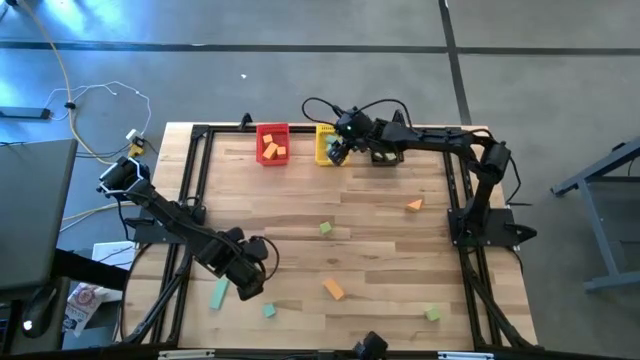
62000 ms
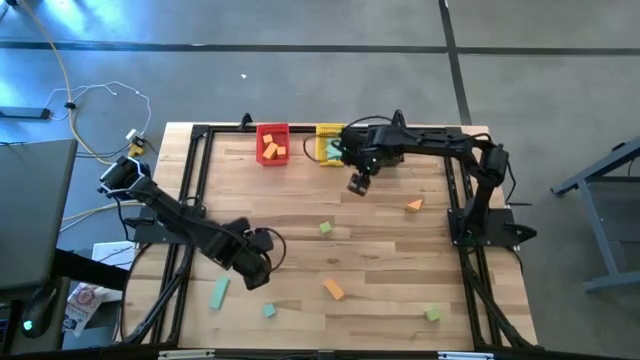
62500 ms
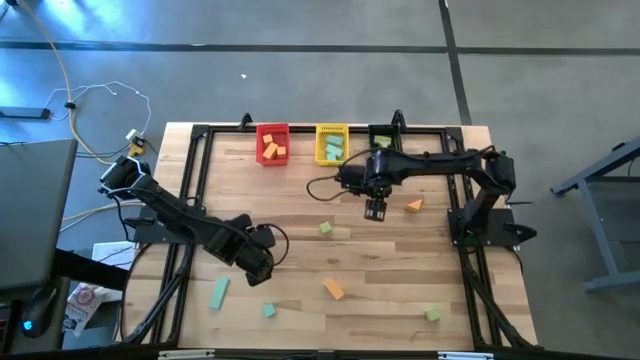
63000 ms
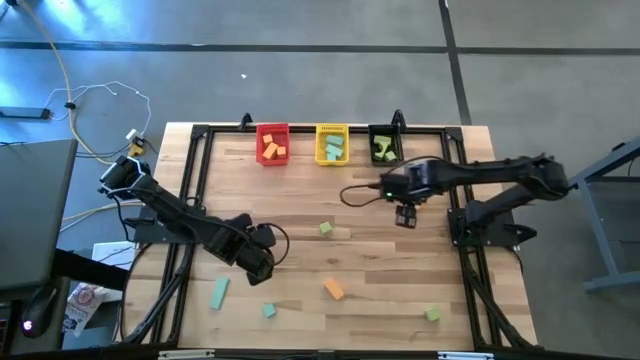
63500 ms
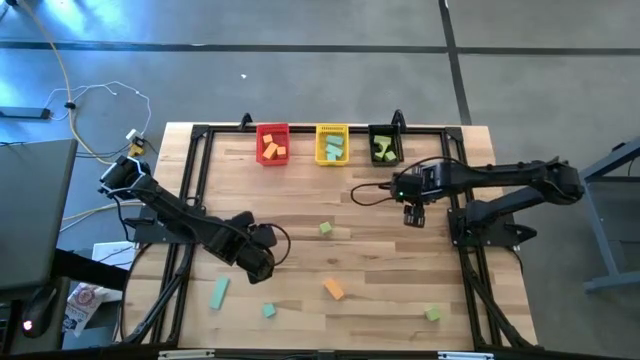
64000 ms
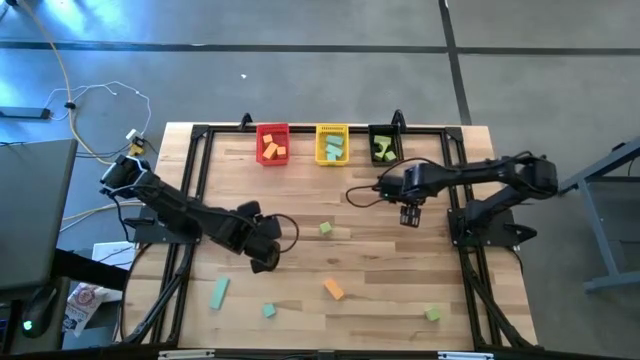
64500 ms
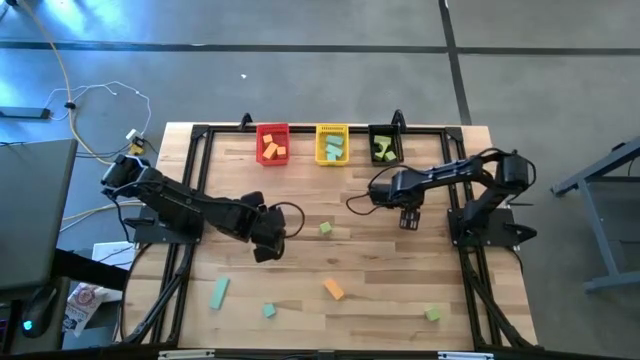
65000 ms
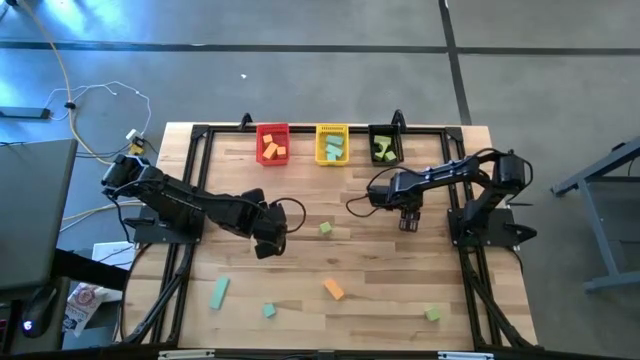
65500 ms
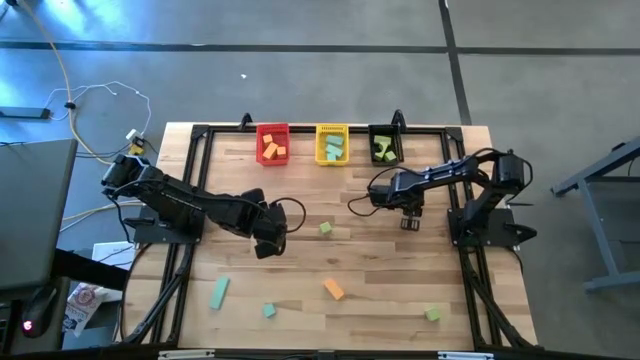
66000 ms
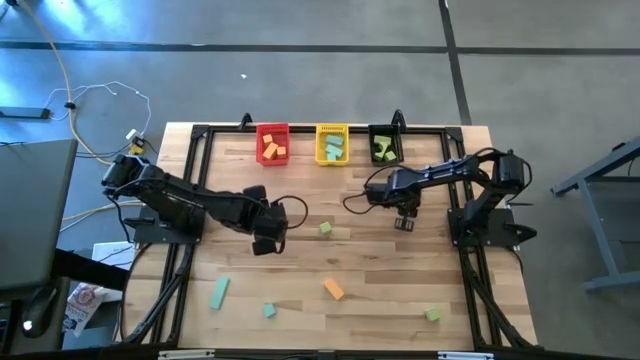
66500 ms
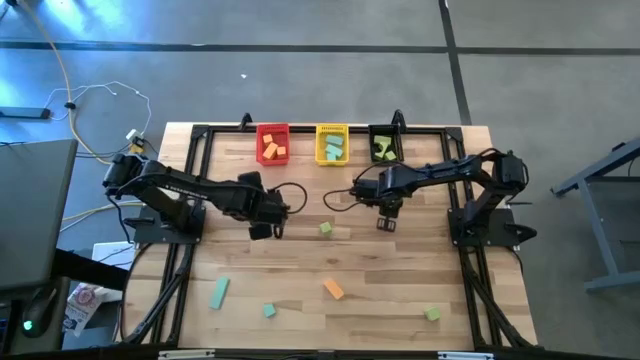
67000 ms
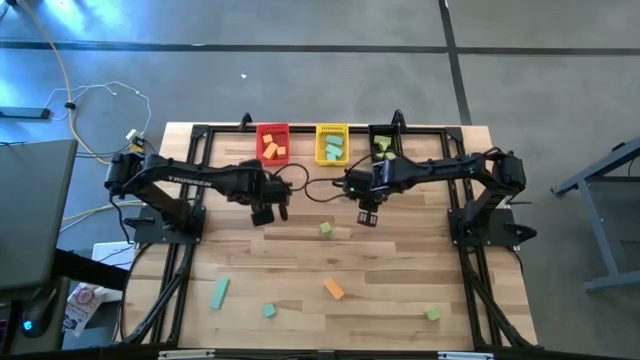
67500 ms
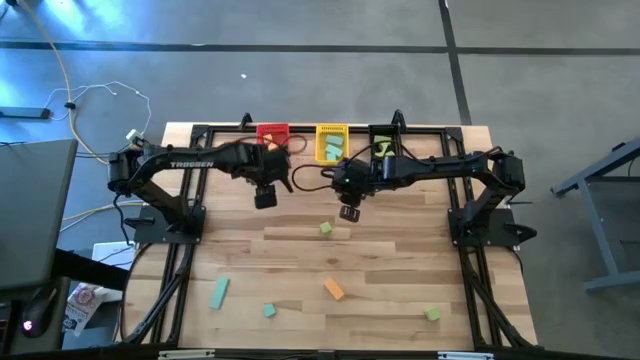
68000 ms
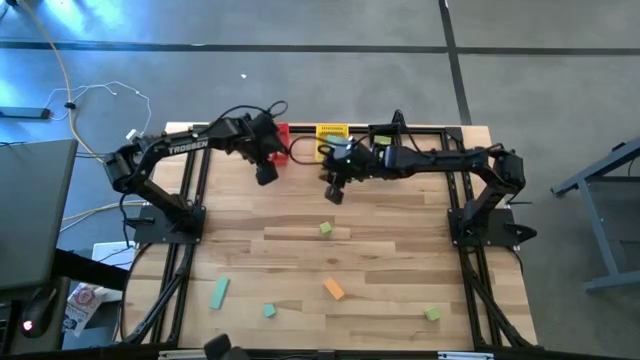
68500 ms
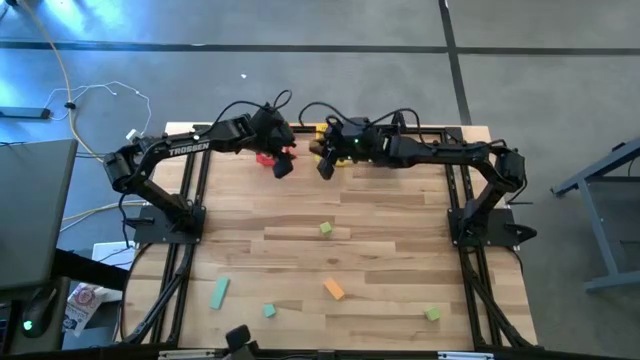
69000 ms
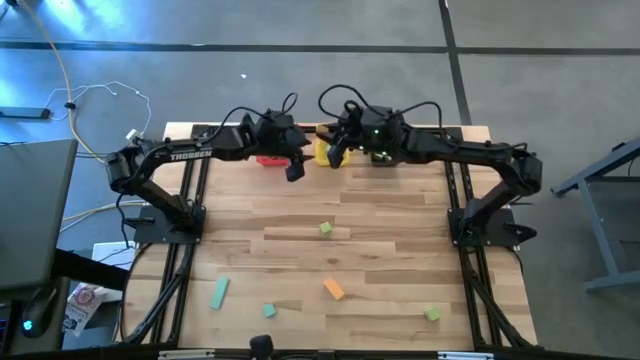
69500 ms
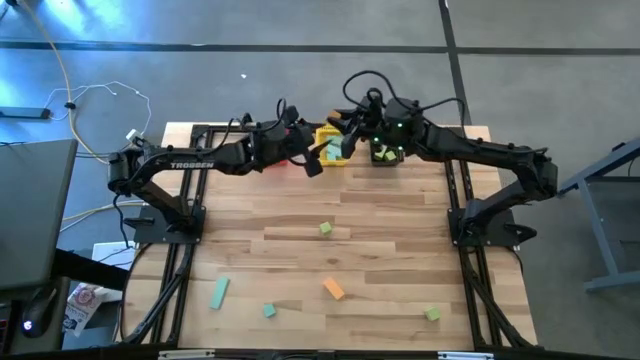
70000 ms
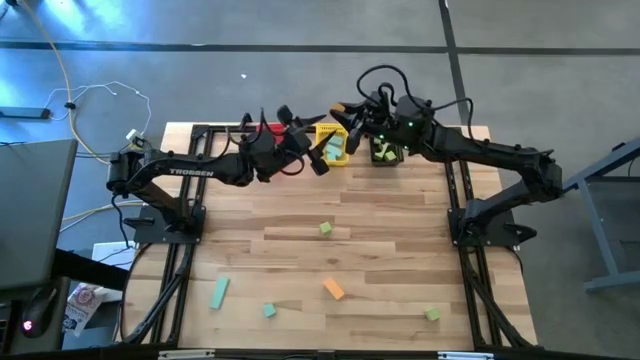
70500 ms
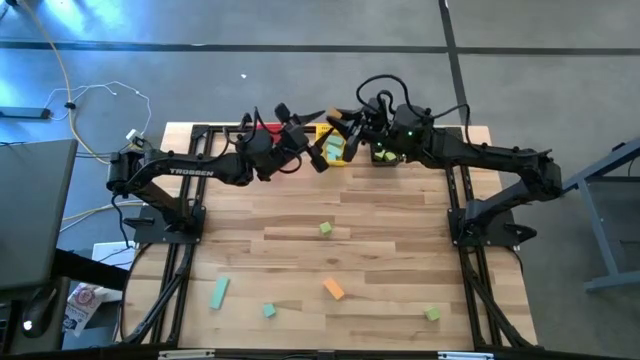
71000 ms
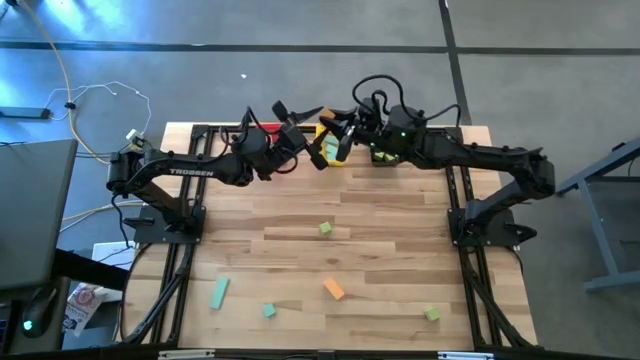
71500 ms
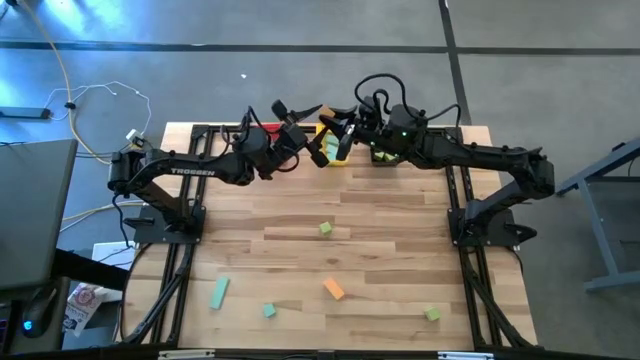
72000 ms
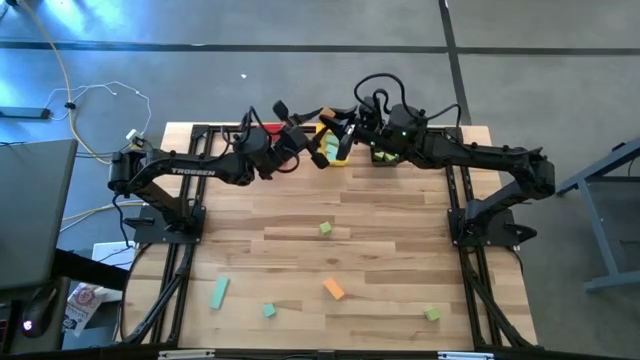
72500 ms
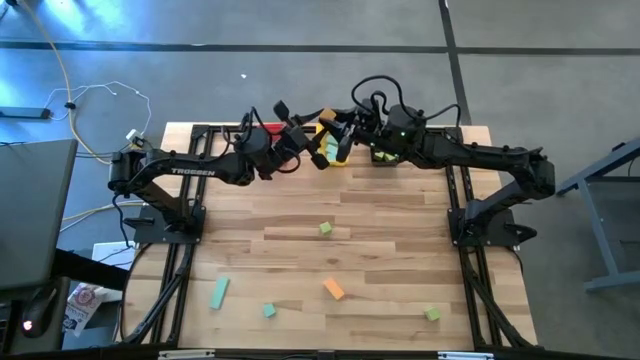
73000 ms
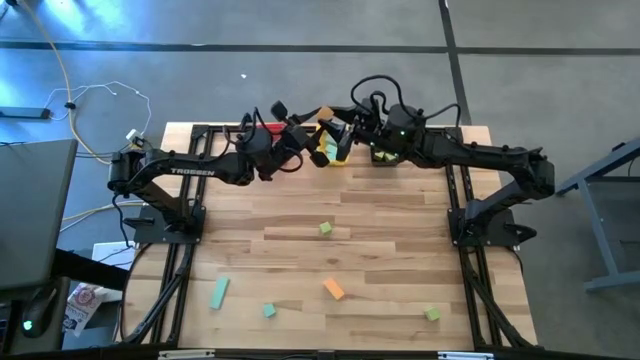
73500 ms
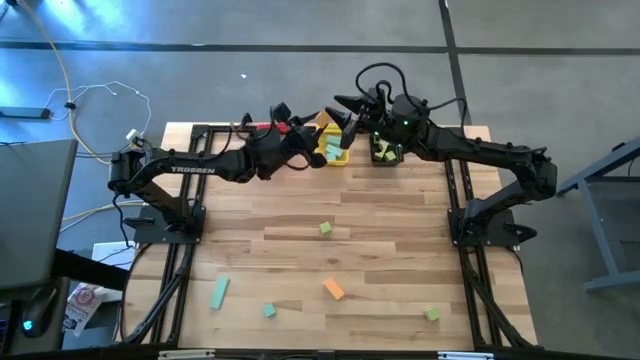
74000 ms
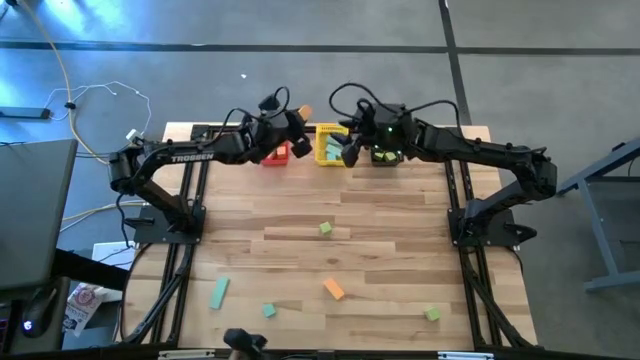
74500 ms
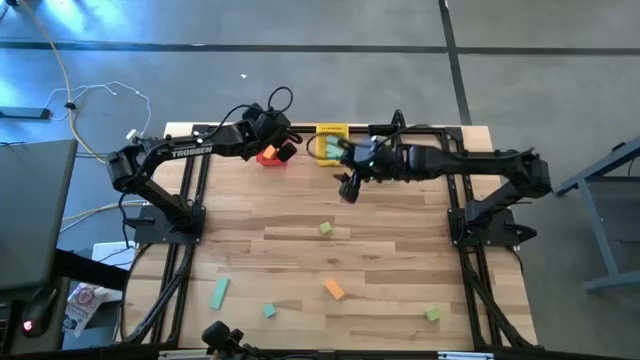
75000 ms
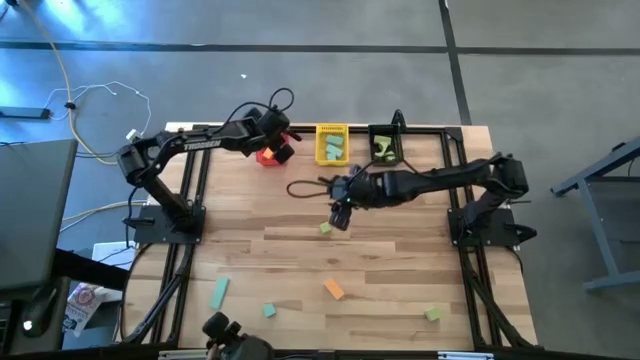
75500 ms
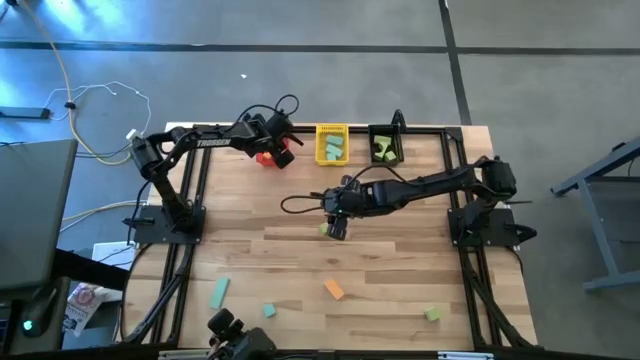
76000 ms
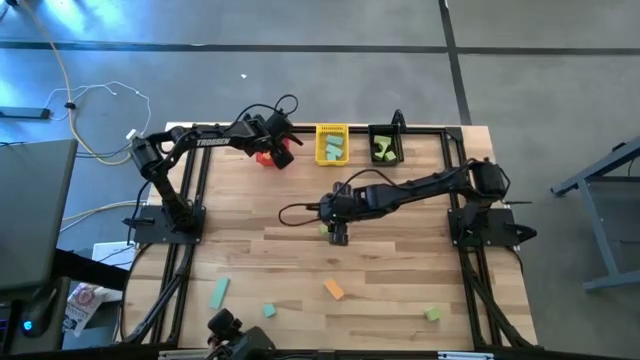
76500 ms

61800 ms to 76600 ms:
Task: Sort & place blocks by color
Put the orange block into the red bin

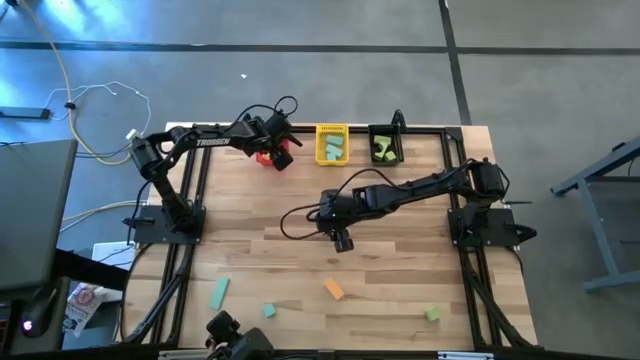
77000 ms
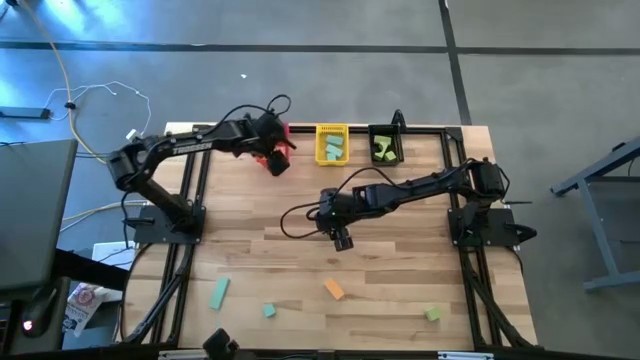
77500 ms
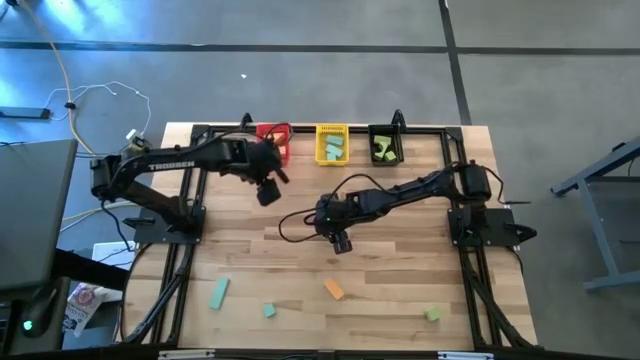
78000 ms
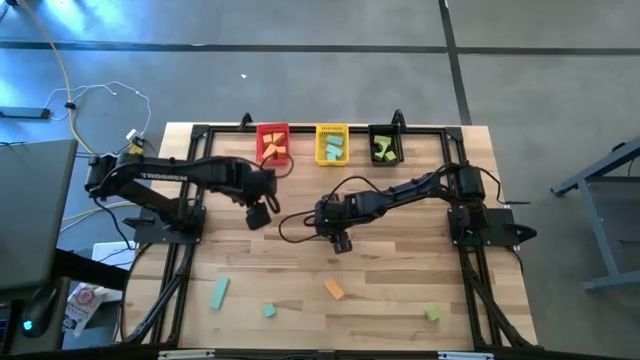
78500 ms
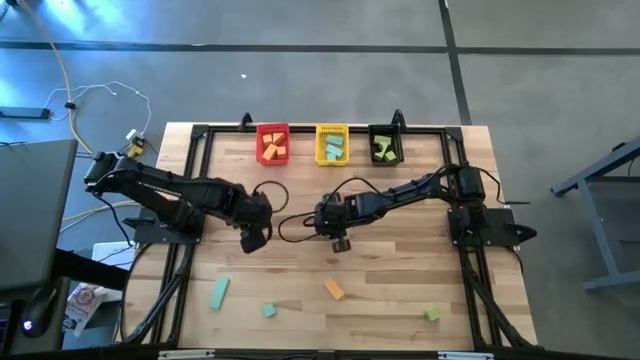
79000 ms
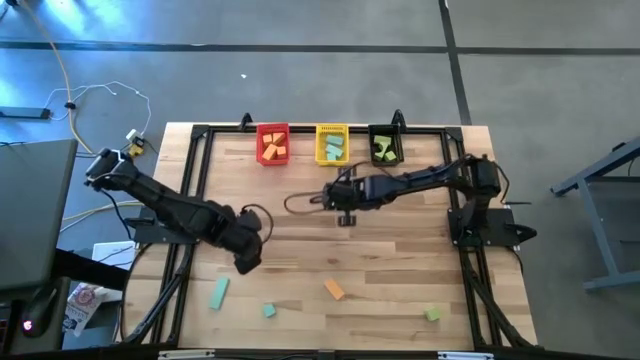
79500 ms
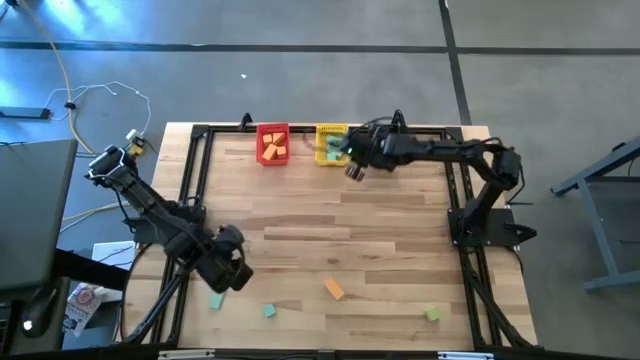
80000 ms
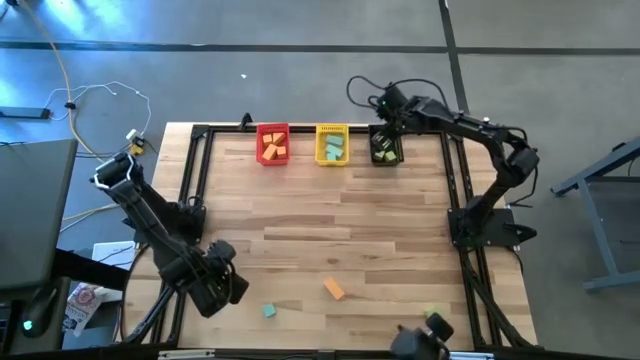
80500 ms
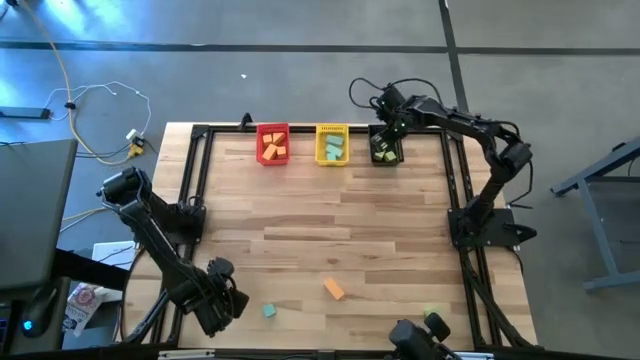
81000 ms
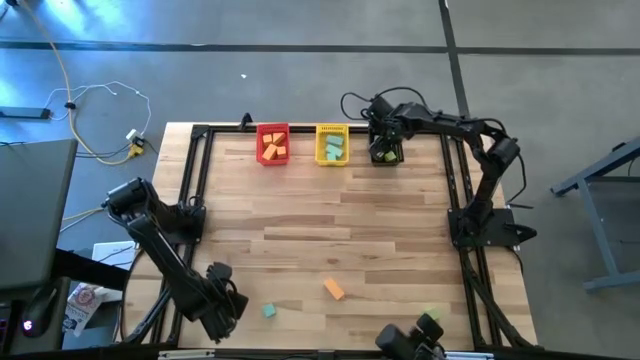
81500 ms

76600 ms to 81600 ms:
Put the green block into the black bin
